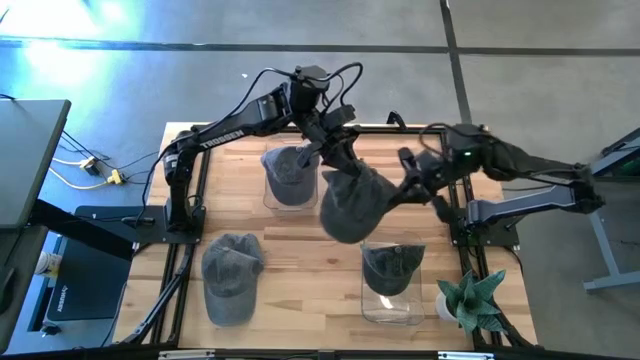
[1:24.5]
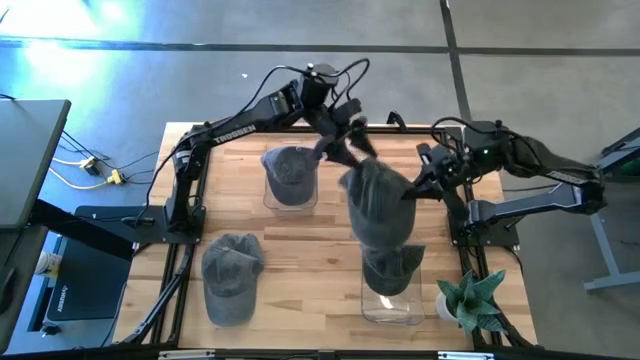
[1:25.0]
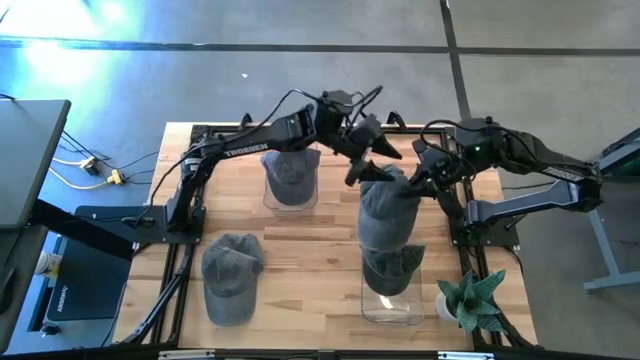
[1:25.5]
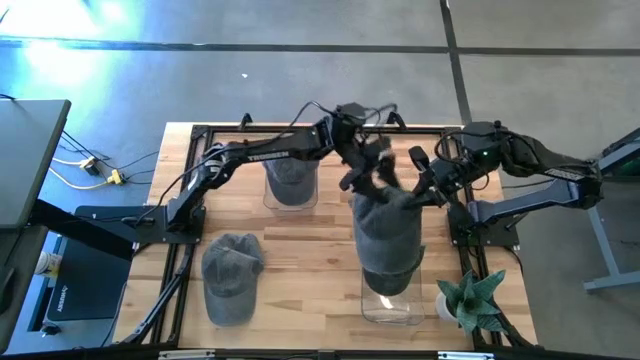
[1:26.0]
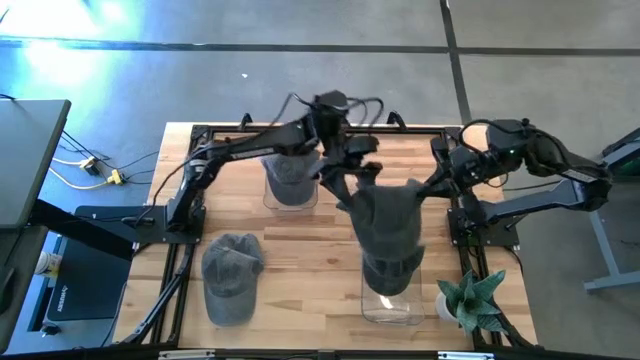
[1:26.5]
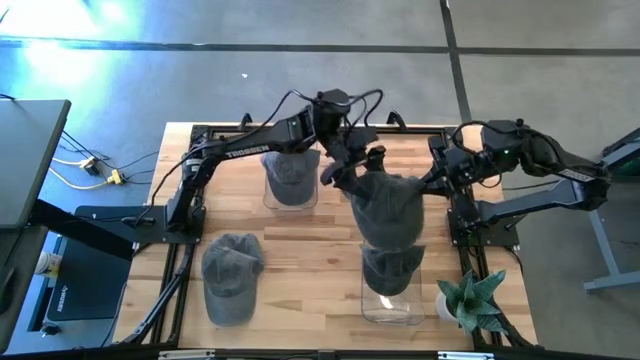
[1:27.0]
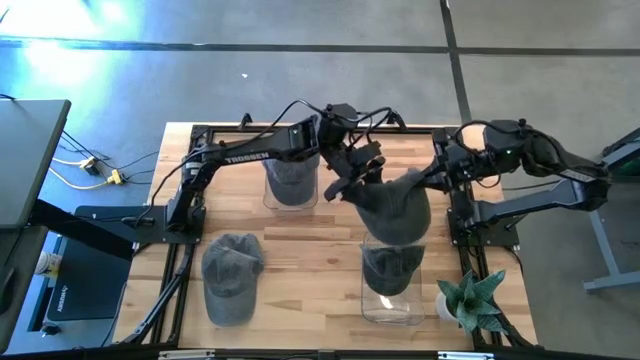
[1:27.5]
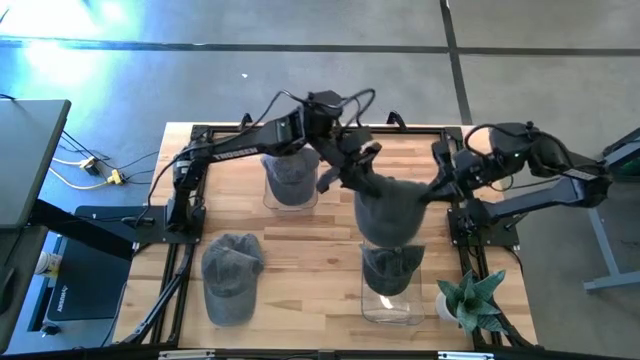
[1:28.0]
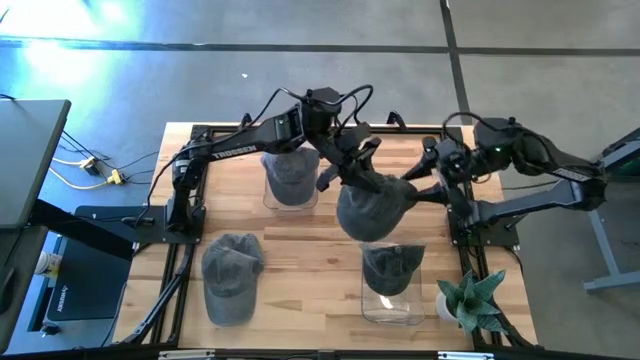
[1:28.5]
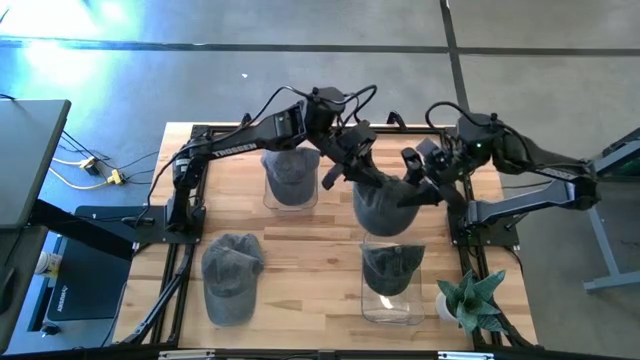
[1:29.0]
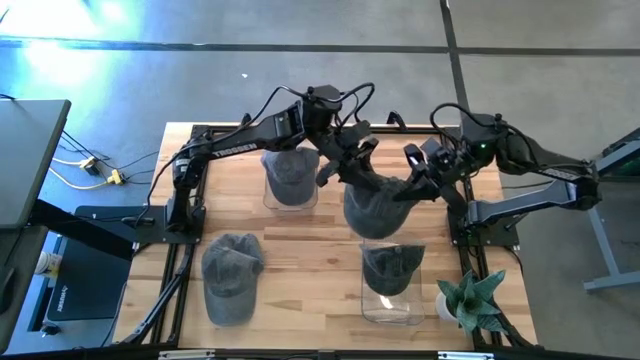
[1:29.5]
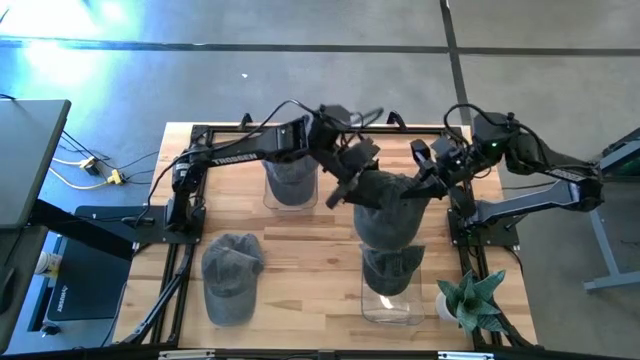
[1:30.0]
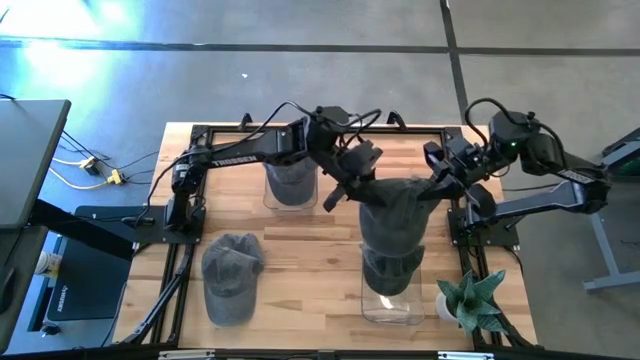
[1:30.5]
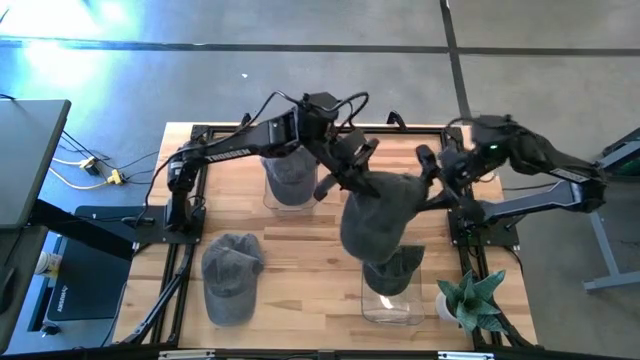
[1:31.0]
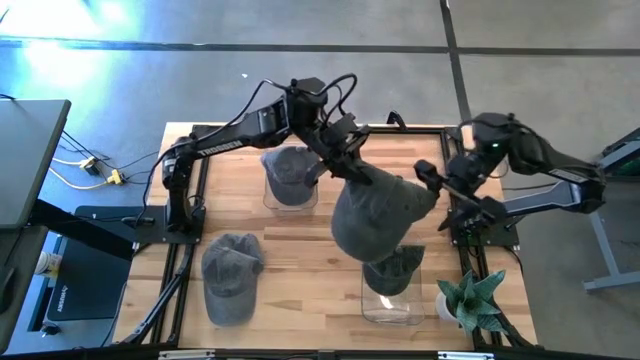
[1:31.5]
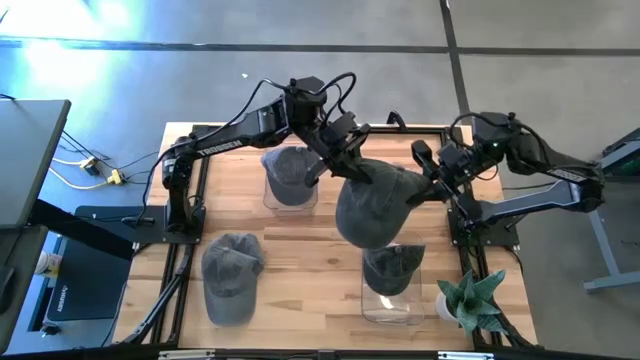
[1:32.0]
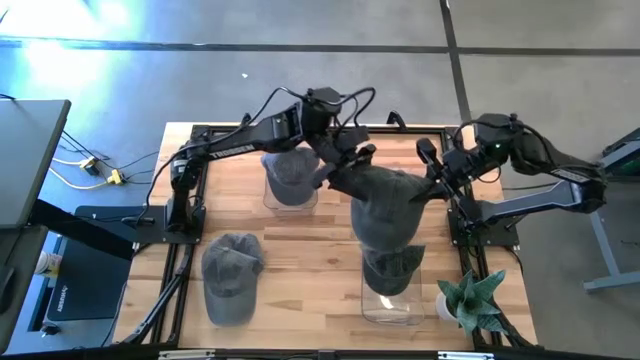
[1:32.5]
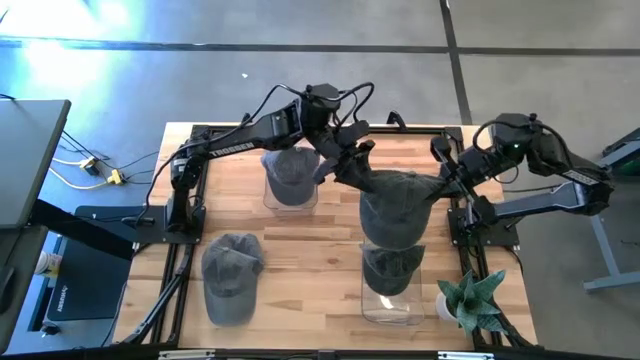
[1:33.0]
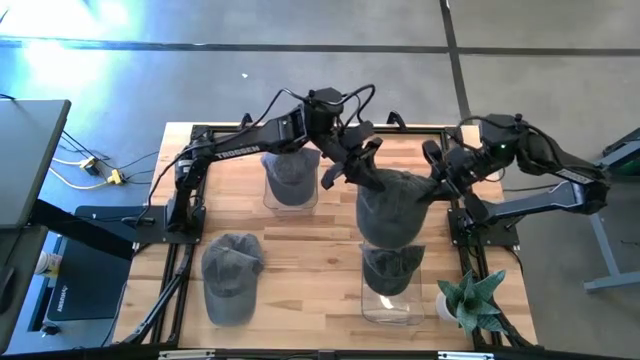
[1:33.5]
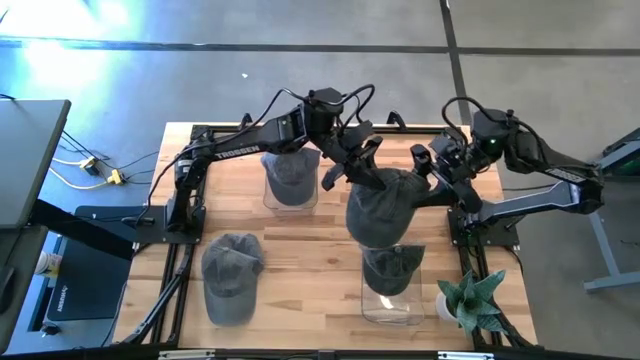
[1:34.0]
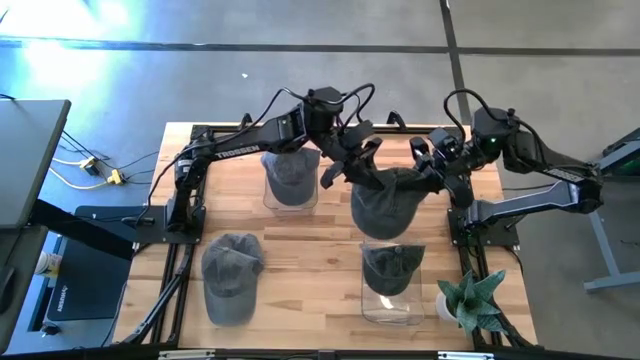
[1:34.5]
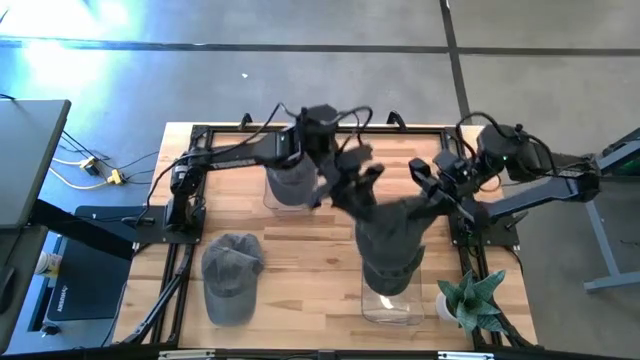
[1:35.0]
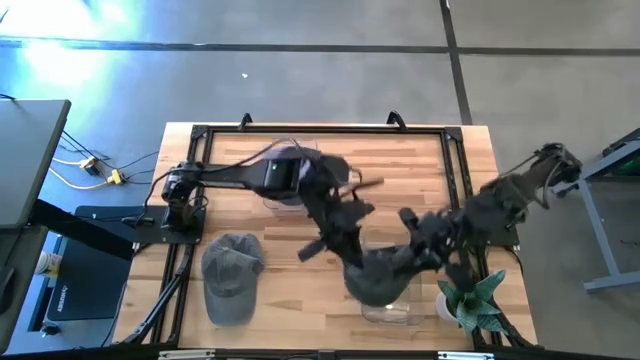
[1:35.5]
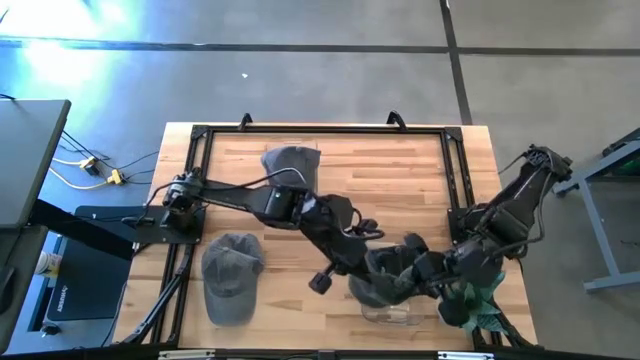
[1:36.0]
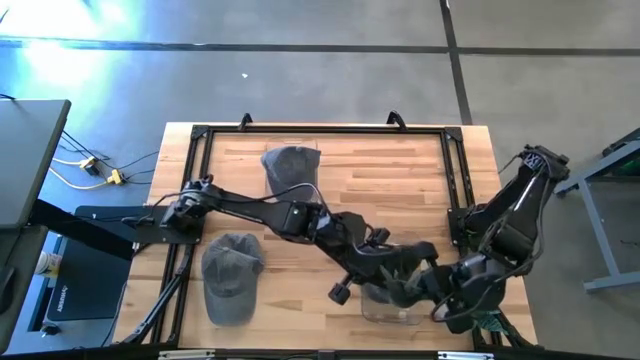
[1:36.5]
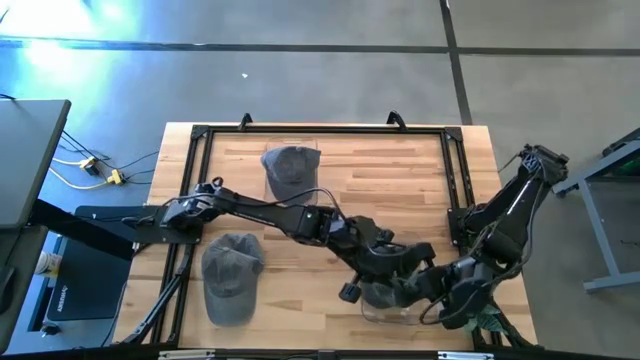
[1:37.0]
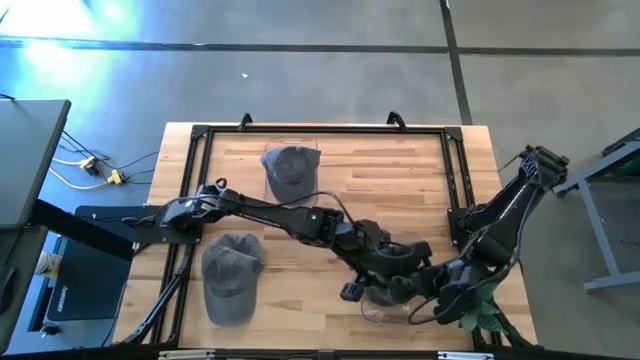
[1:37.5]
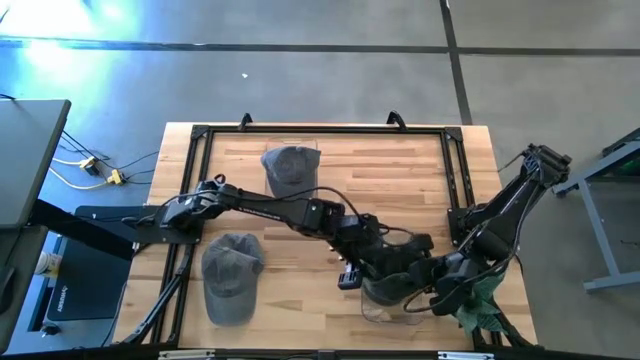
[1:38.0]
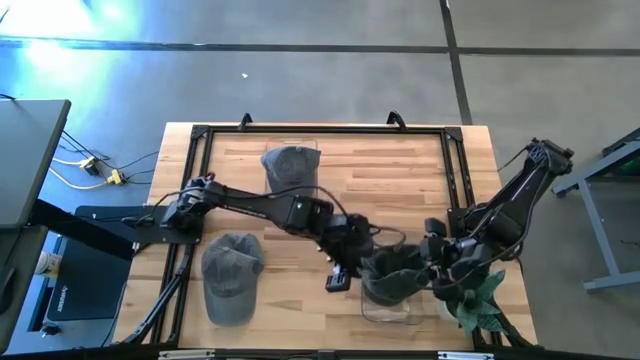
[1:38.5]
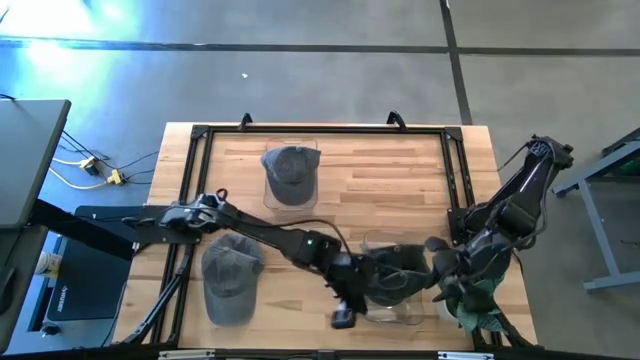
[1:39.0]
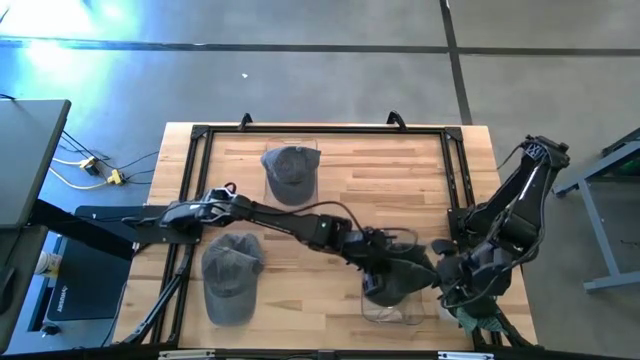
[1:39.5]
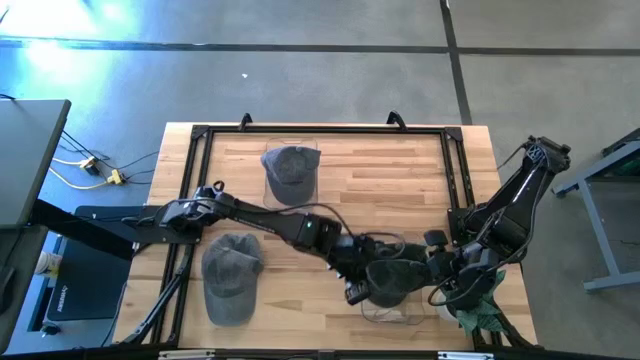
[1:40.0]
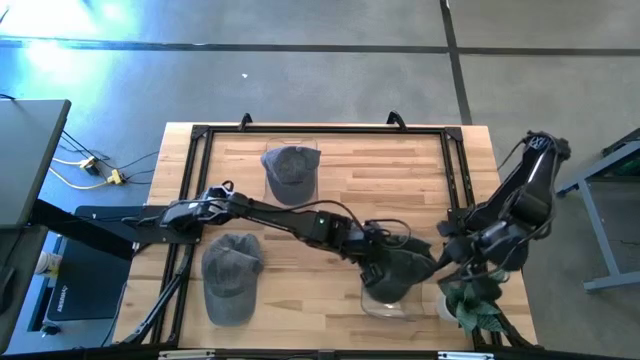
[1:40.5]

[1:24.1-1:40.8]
Task: Pick & Place hat
Put the dark gray cap into the bottom transparent bin

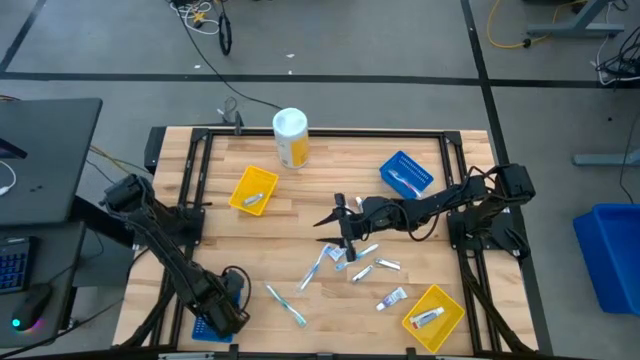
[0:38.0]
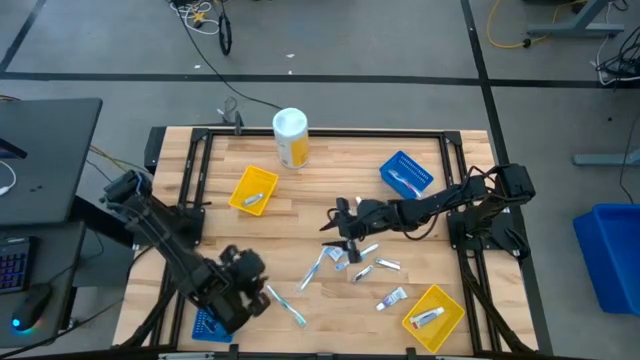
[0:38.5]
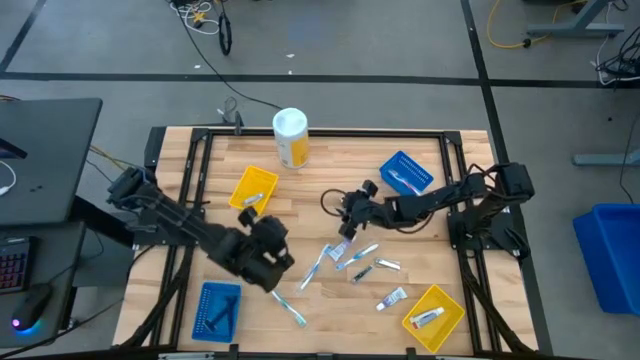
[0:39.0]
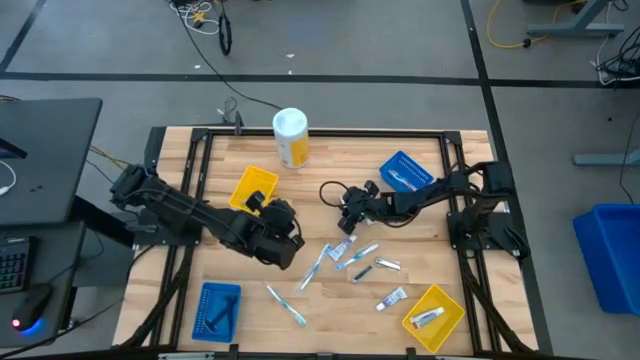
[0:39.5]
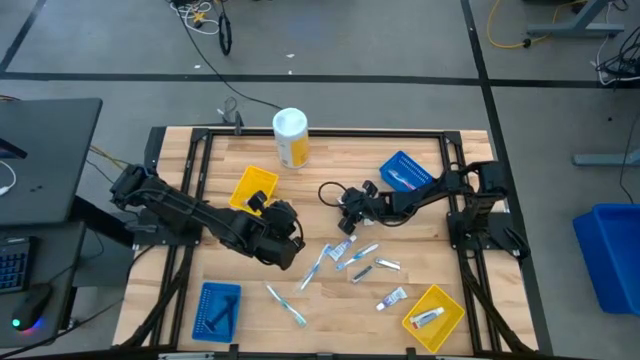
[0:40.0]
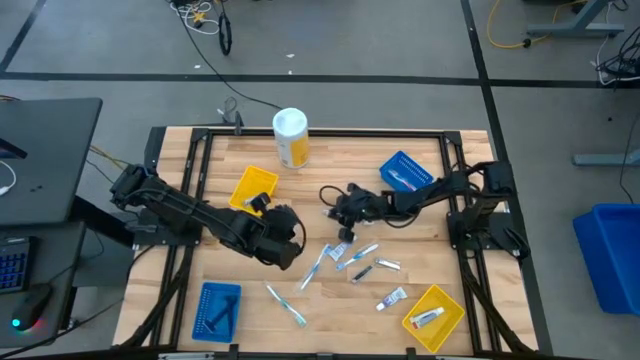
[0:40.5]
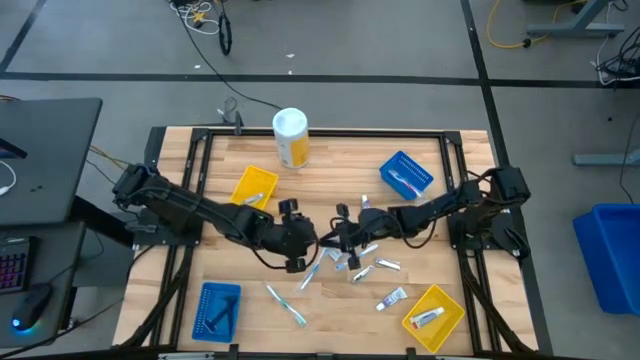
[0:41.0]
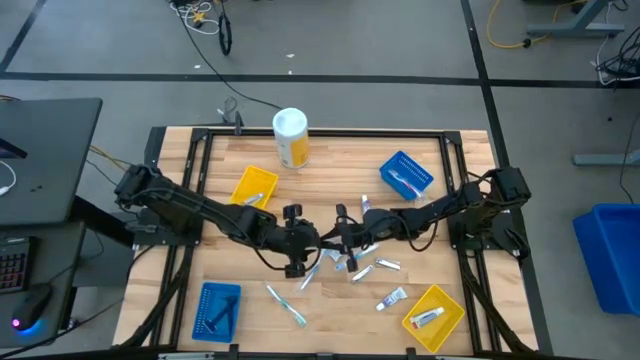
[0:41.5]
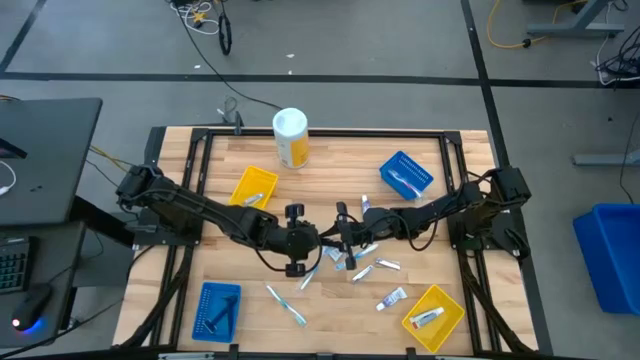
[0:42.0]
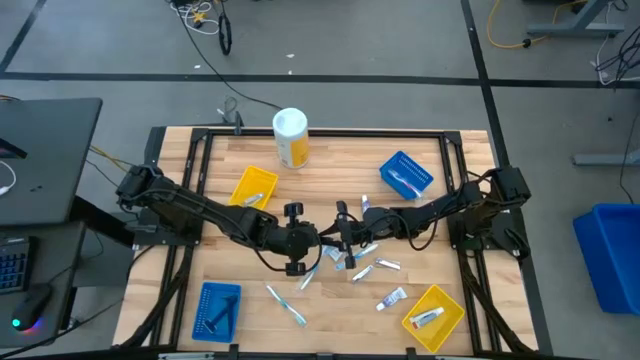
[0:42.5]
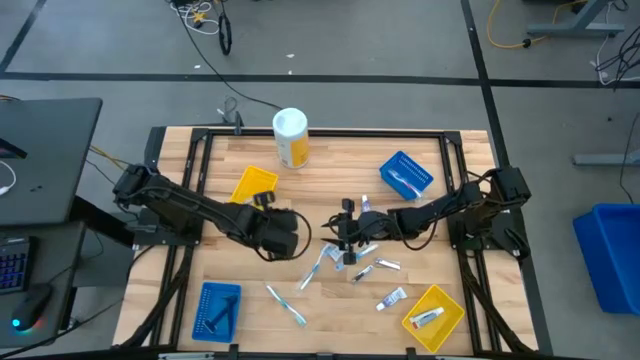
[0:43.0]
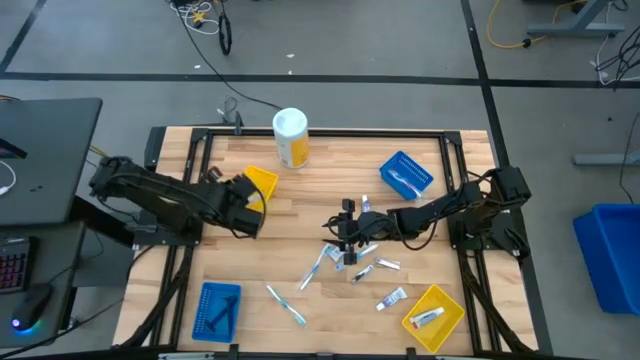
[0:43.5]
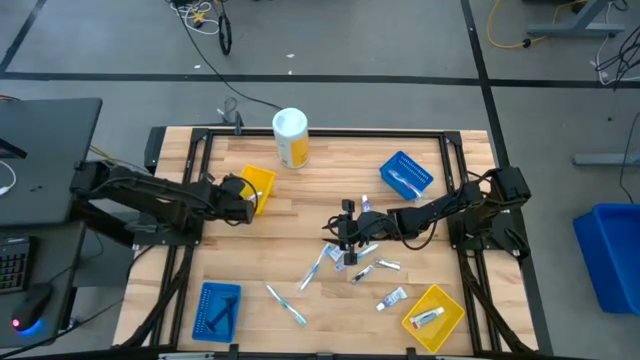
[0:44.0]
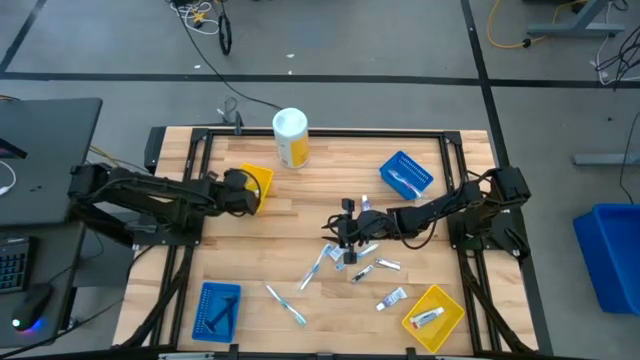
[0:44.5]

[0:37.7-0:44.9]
Task: Pick & Place Travel size toiletries
Put the silver nail cutter into the top yellow bin
